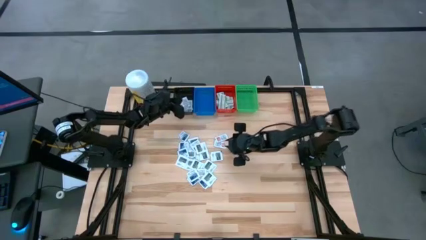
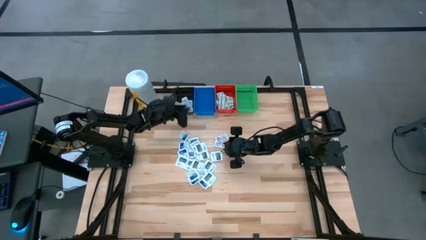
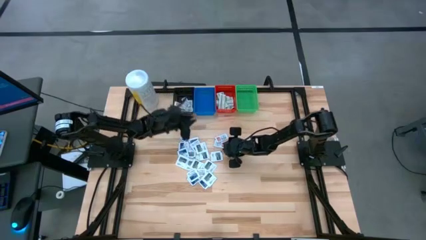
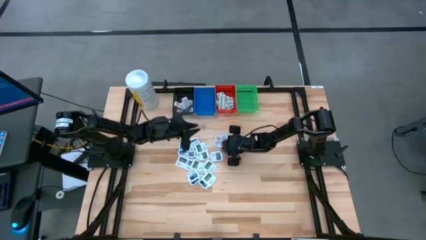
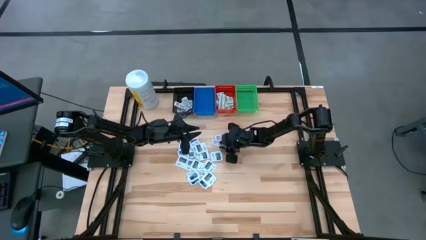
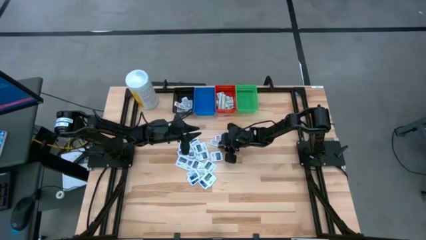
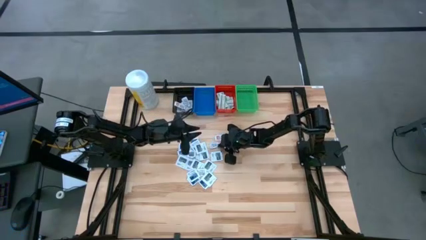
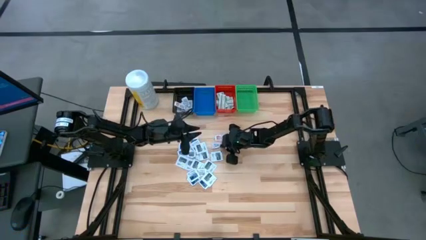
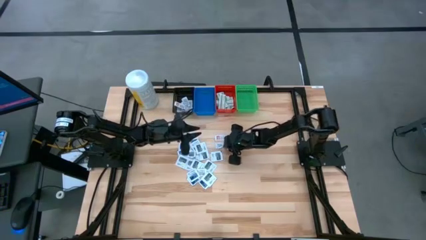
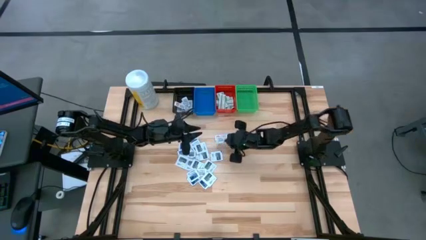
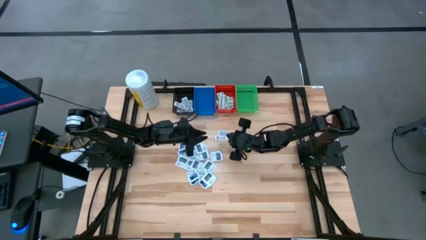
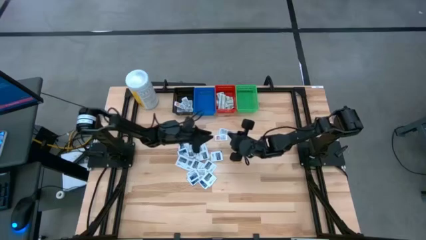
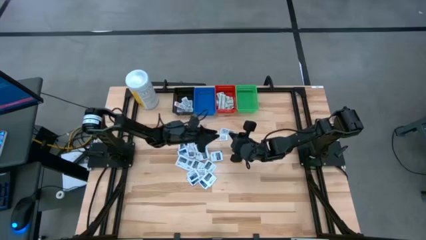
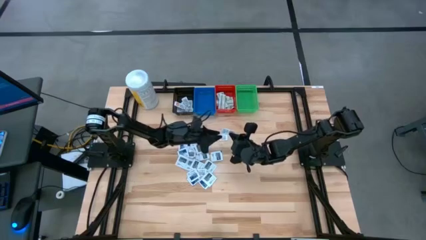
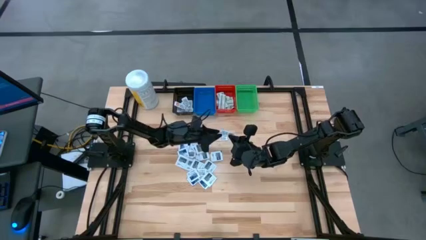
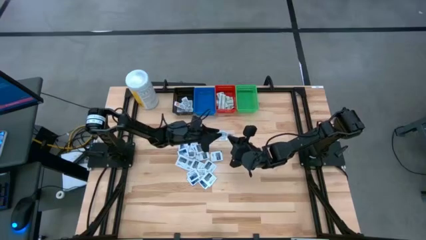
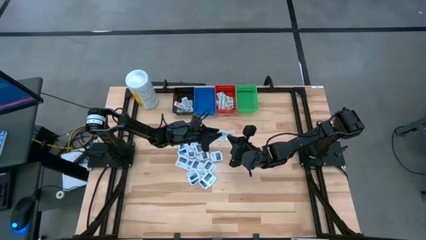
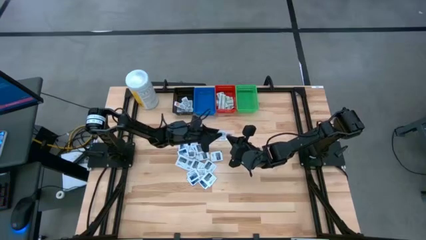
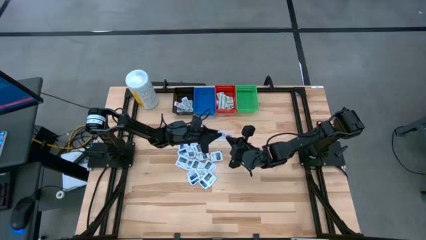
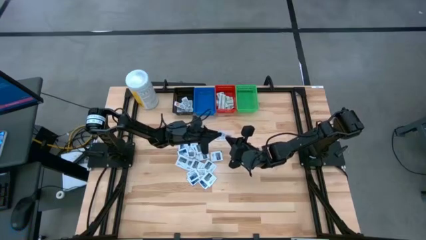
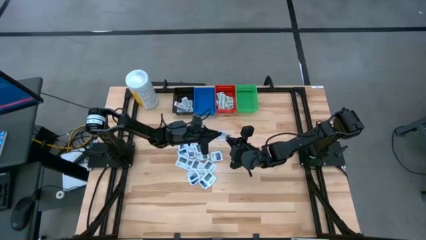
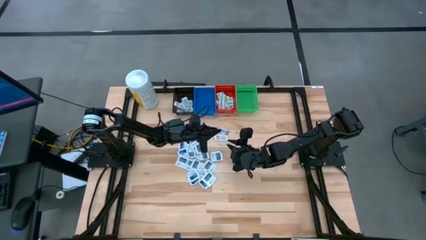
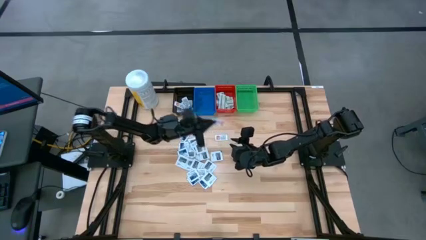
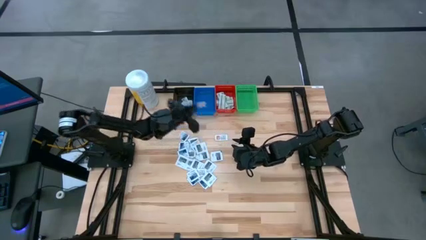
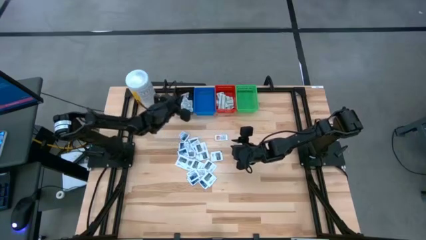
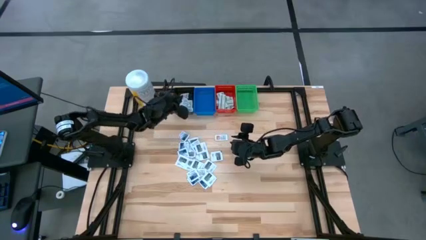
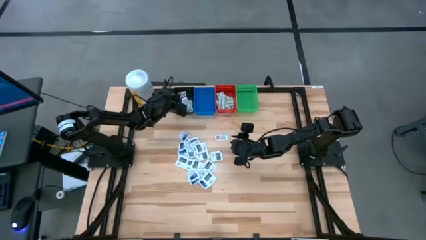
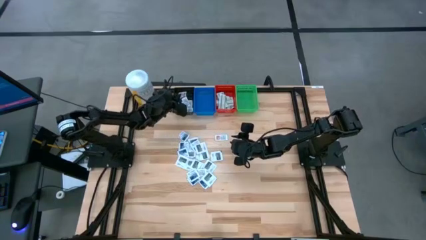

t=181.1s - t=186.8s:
Task: Pick & Place First Aid Supplies
Put the orange ointment pack into the black bin

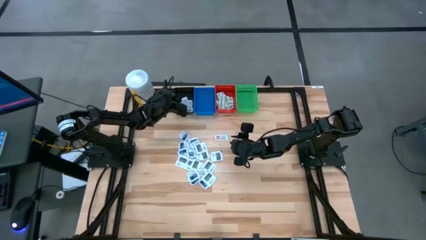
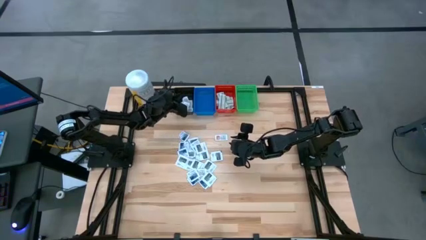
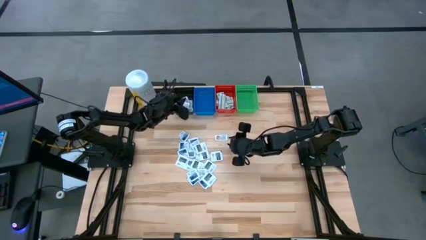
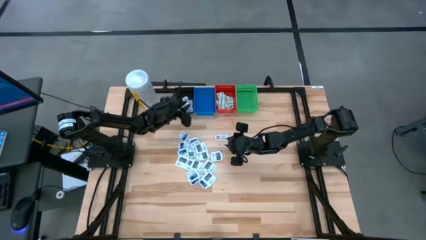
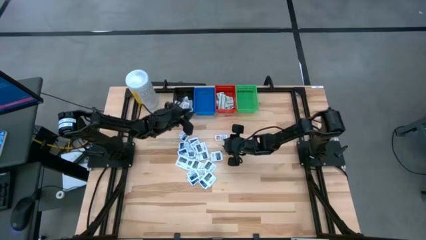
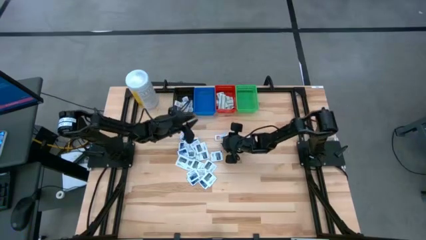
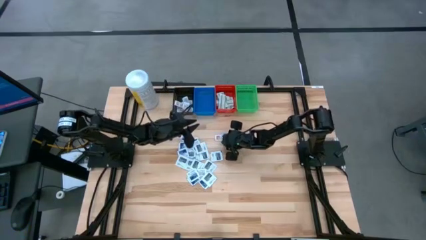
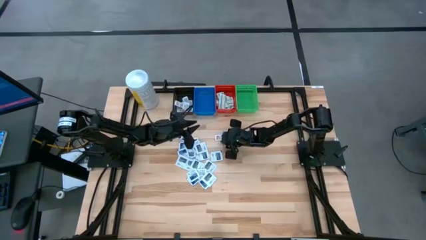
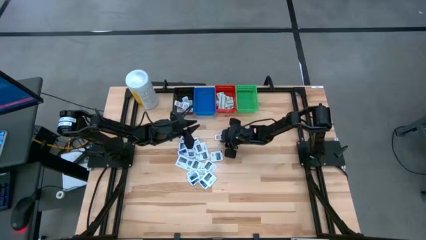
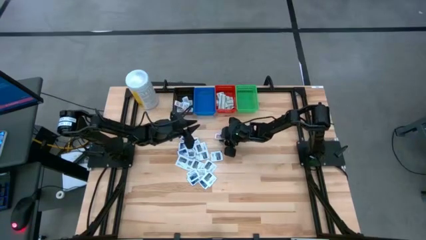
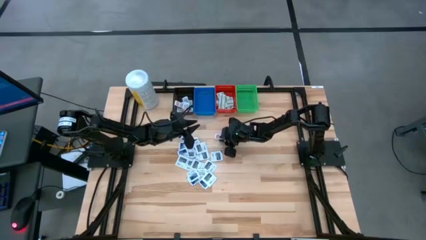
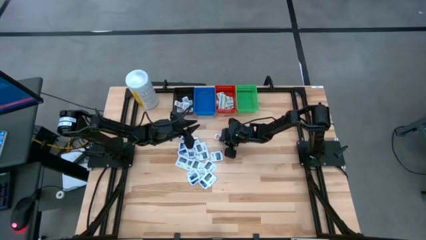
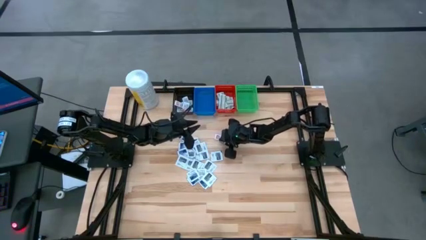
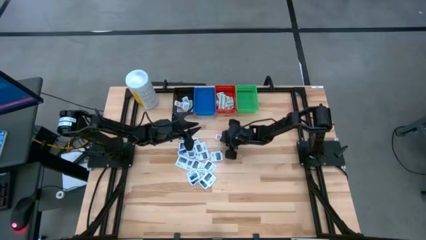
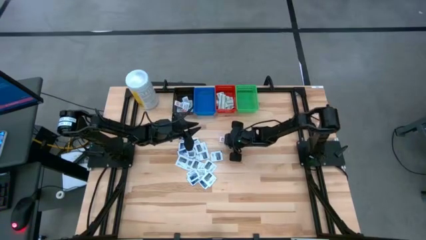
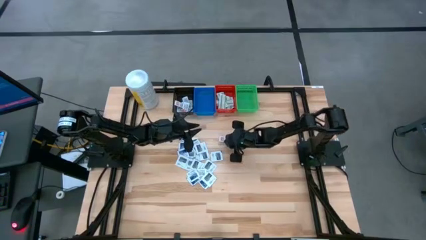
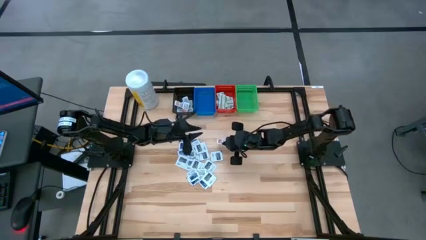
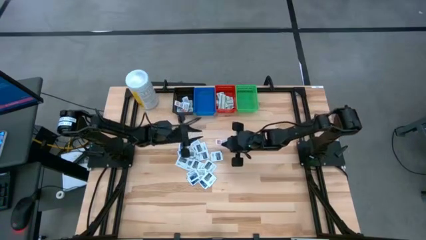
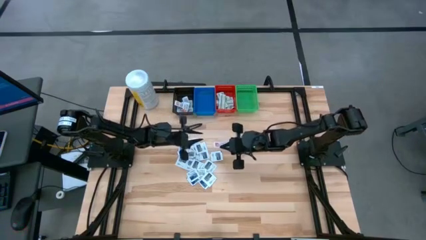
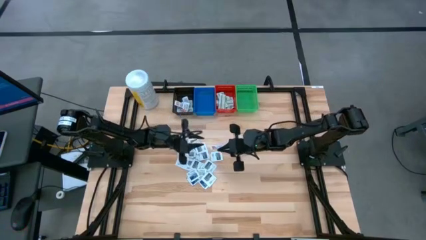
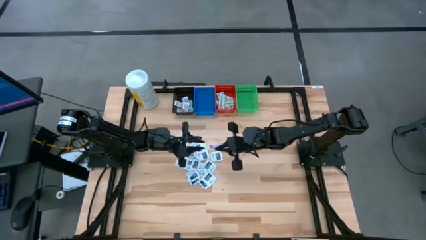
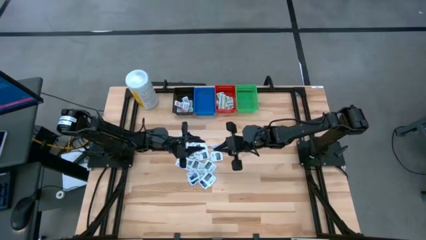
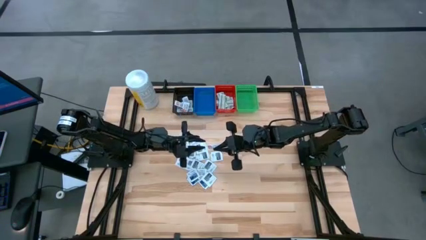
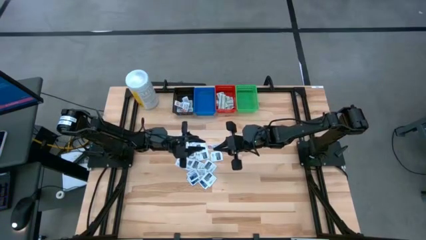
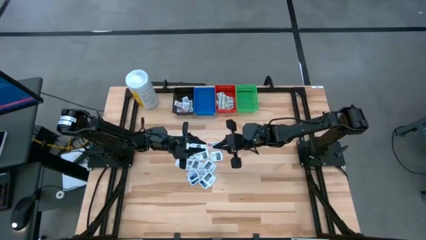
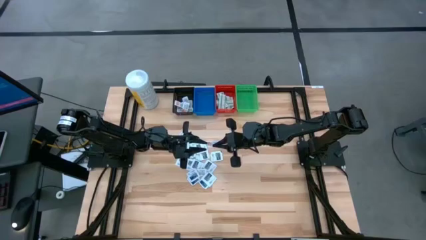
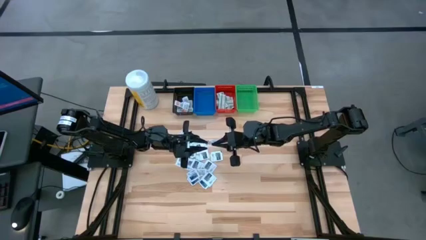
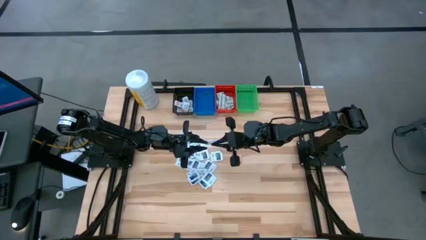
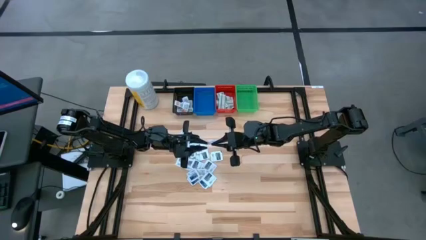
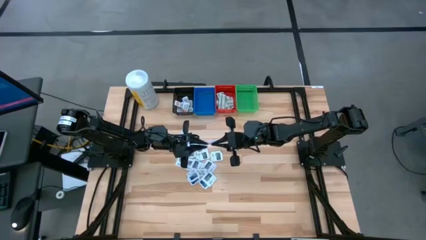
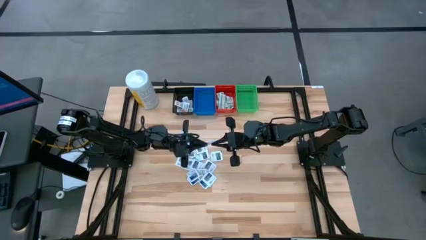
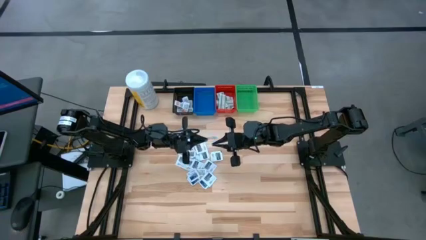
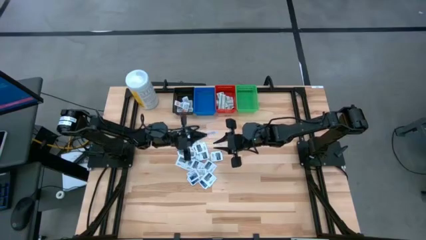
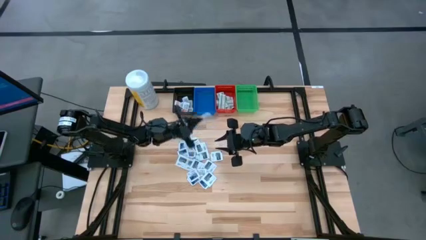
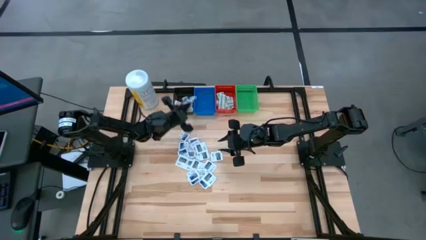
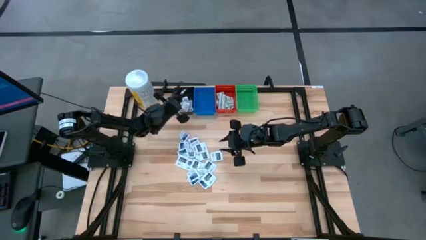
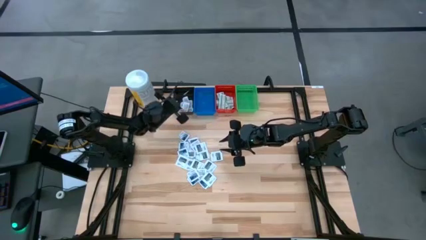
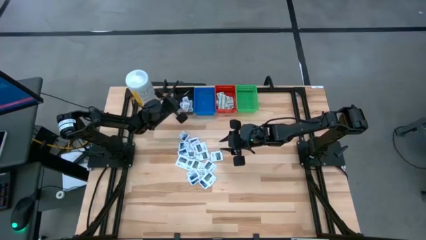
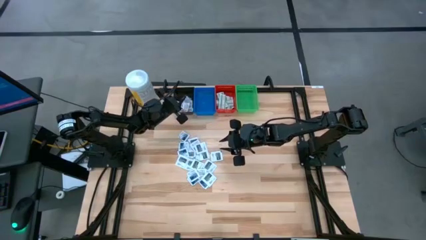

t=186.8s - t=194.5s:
Put the orange ointment pack into the black bin
